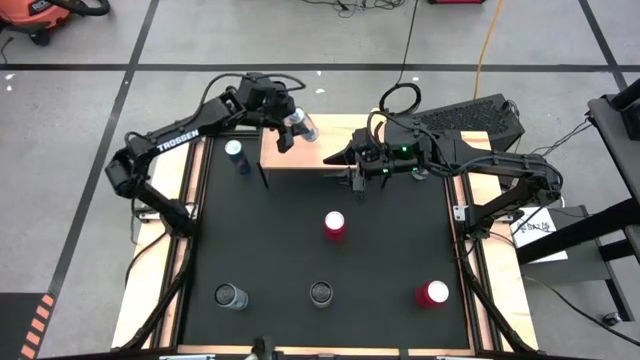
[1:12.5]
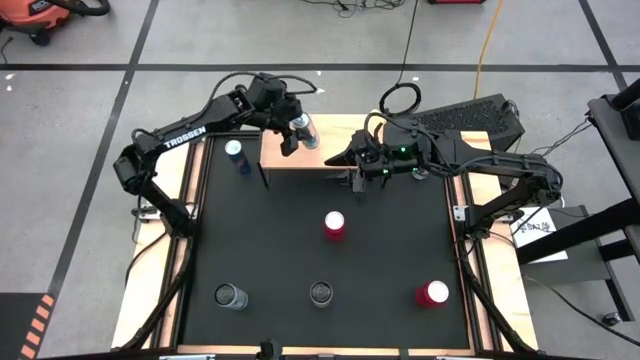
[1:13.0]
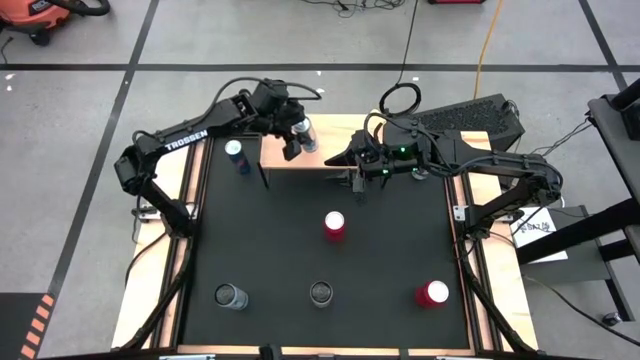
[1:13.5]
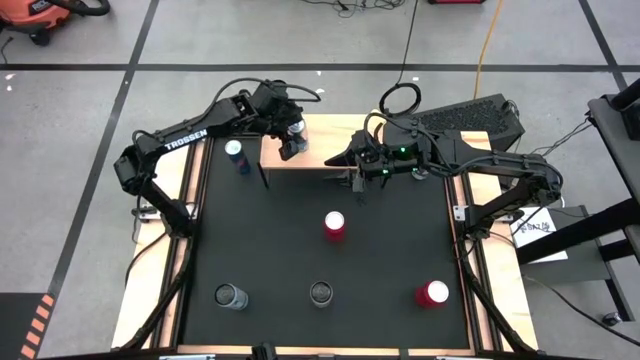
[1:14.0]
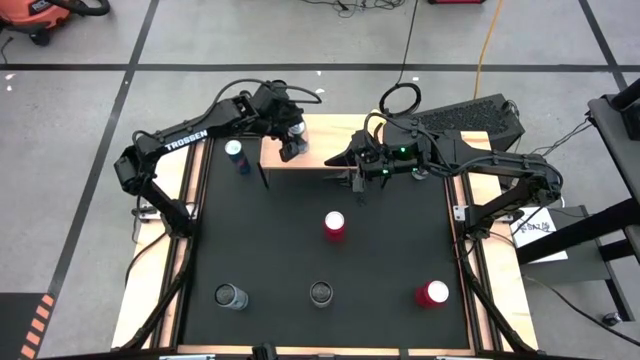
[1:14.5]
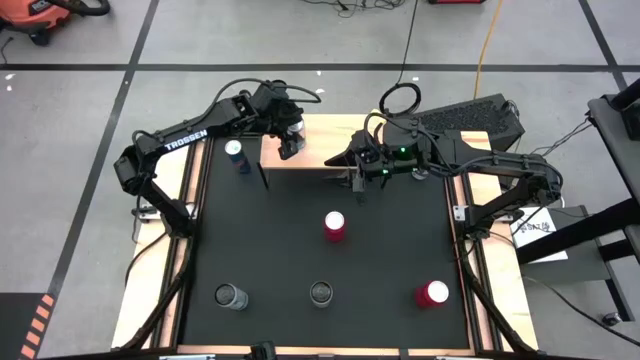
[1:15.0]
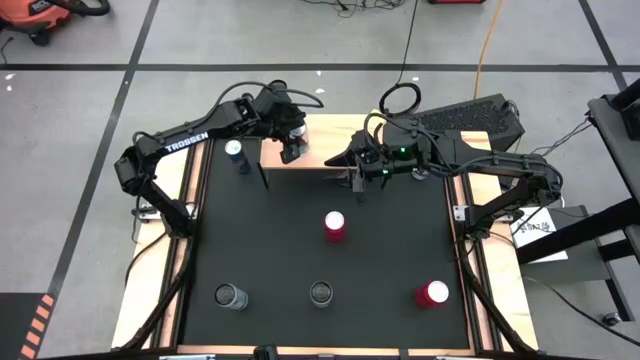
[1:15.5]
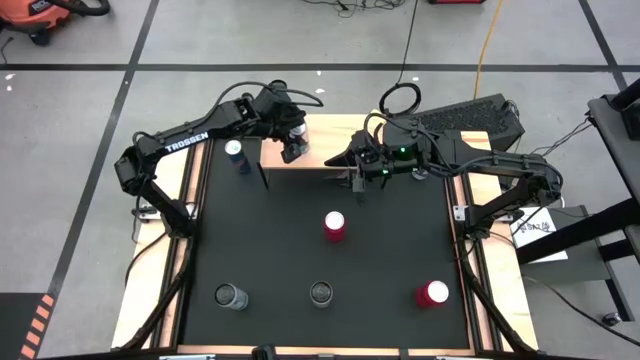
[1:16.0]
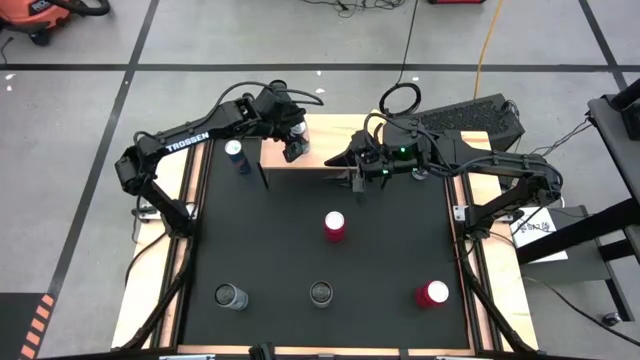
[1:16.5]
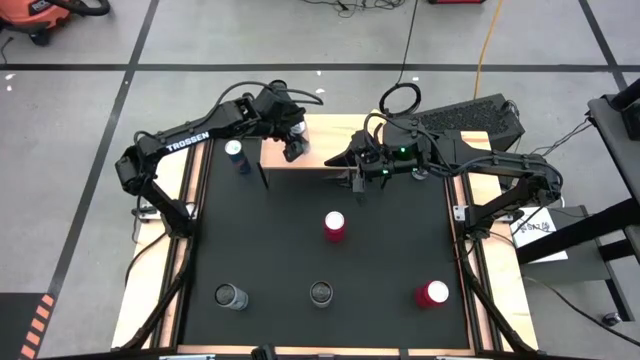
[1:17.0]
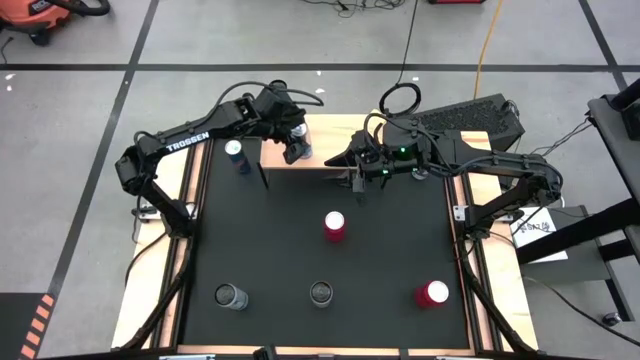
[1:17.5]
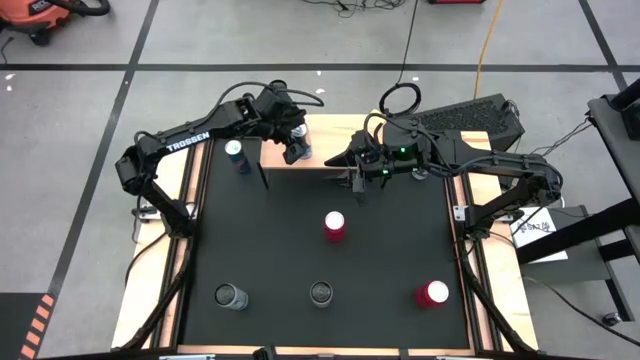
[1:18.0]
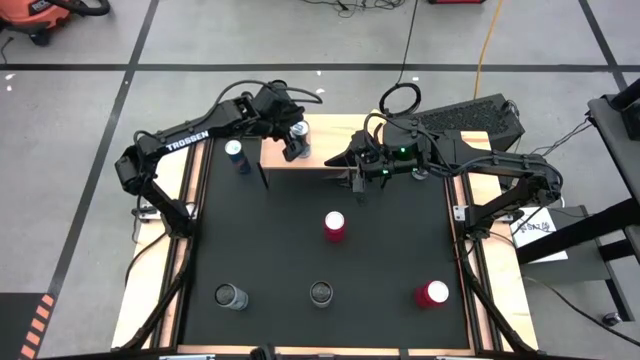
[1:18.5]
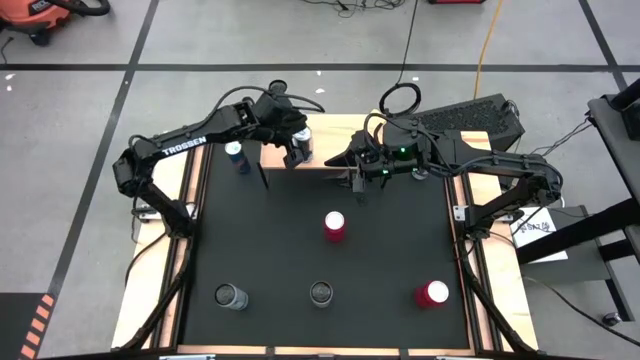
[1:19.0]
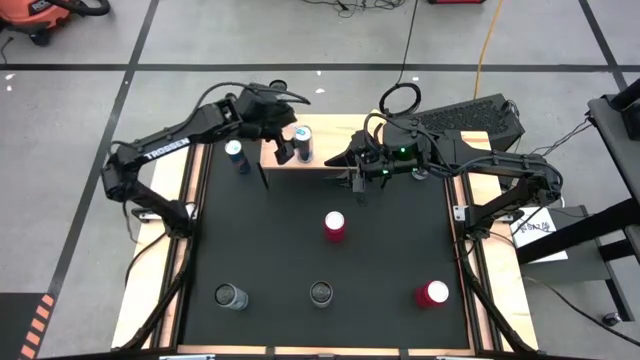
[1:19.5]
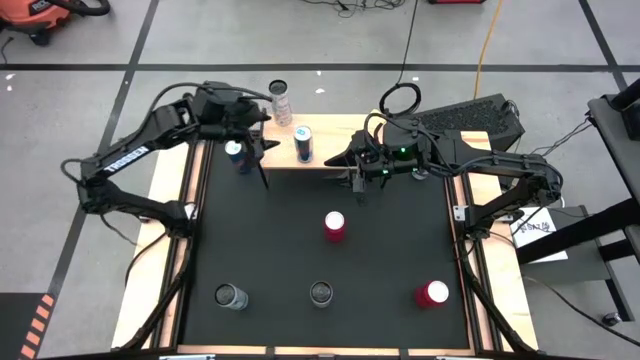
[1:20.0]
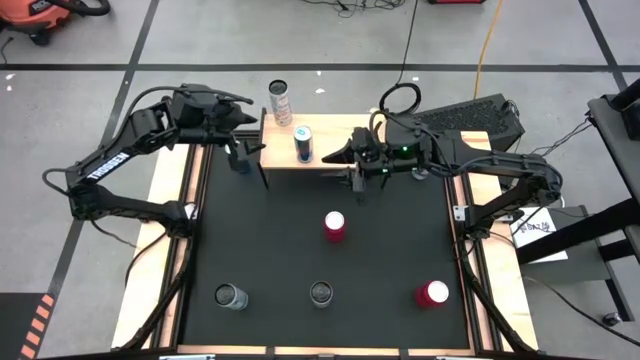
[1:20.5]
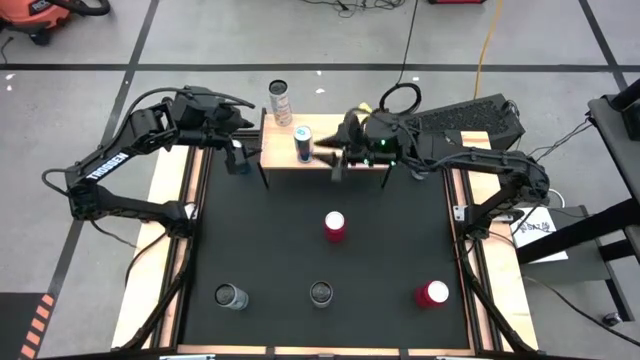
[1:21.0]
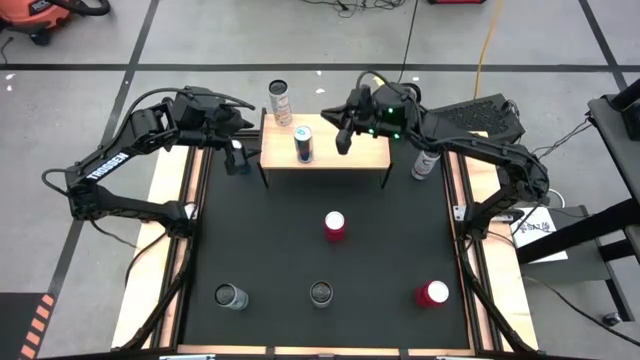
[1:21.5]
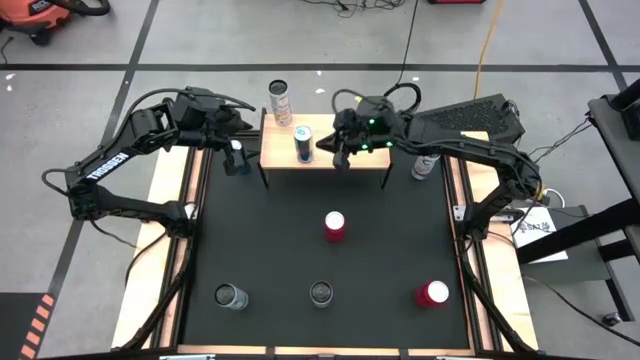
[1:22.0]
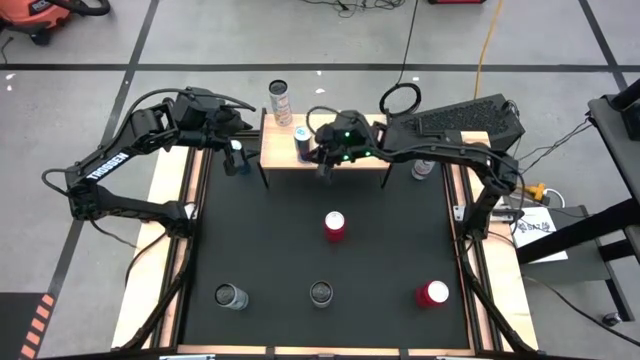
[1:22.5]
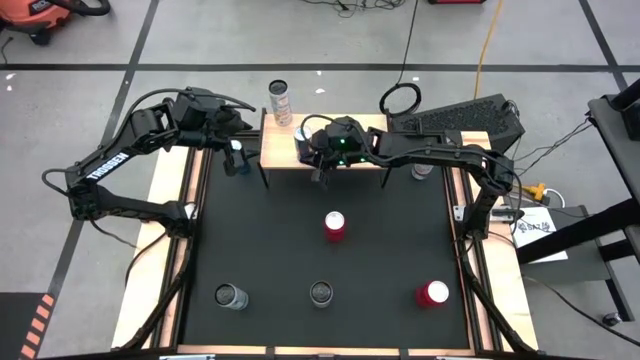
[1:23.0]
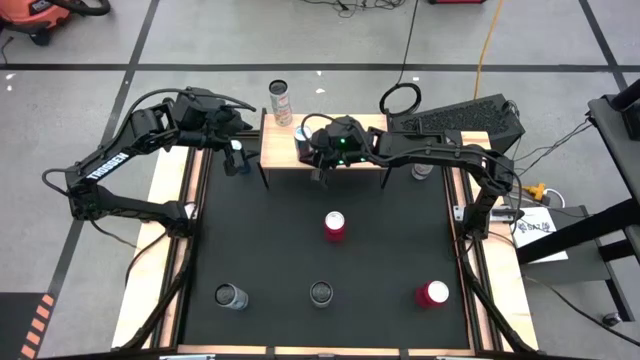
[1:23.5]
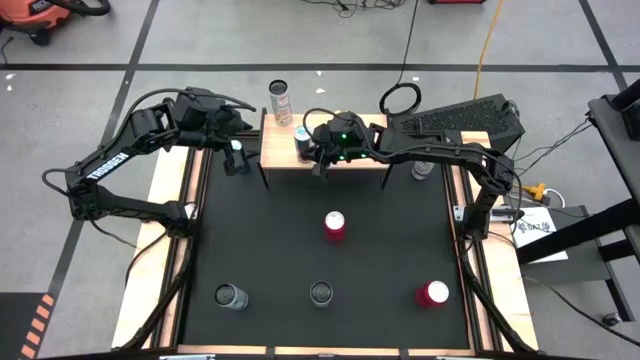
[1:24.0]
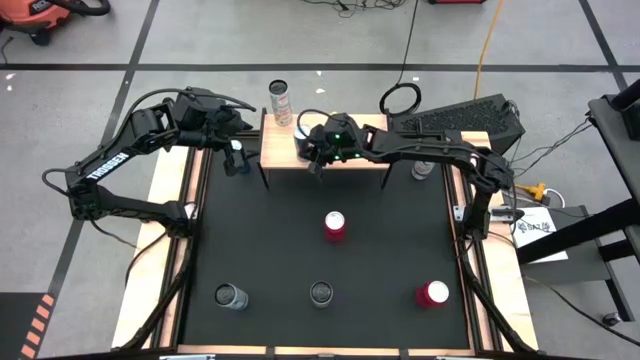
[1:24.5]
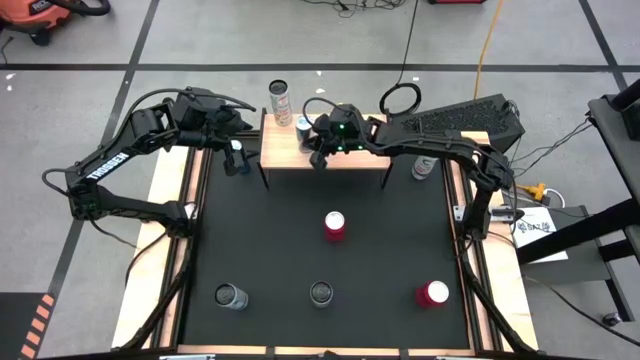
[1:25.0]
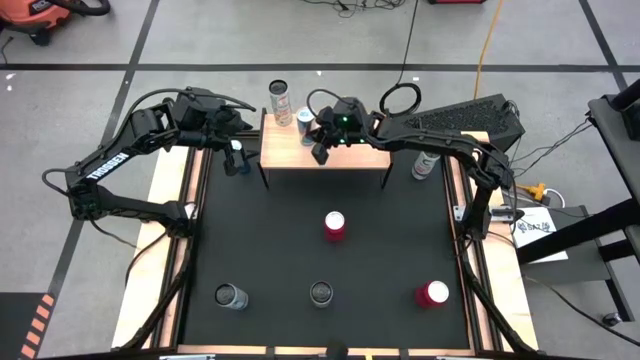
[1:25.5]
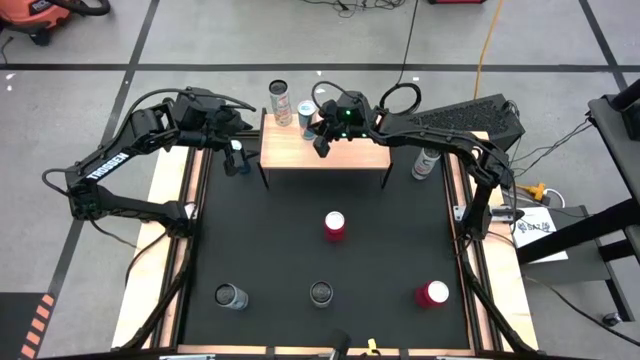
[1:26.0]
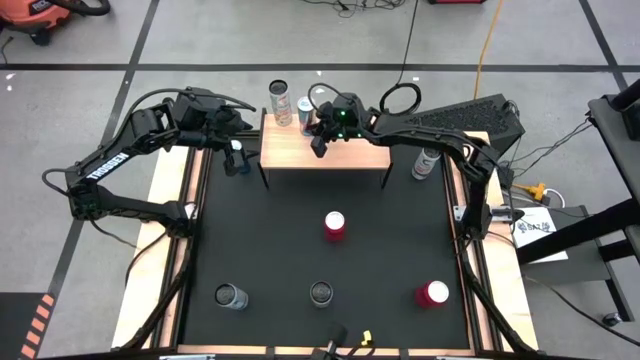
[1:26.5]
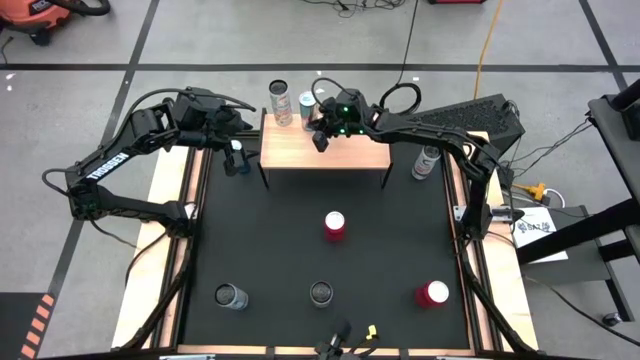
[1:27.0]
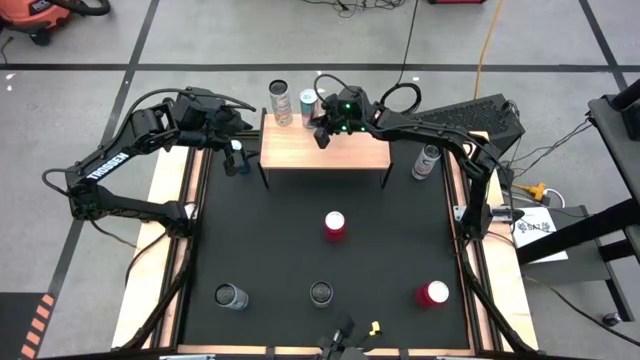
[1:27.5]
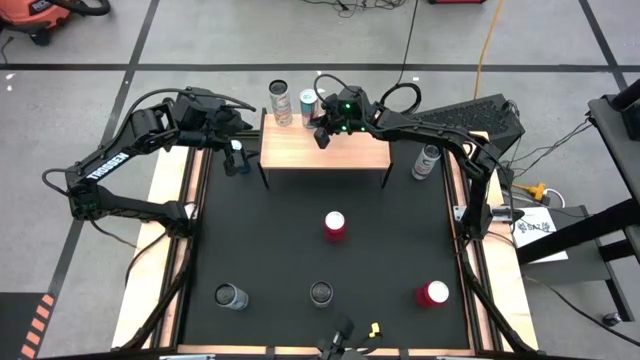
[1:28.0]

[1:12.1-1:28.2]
Task: Place canned beverage on shelf
Put the right blue soda can on the shelf

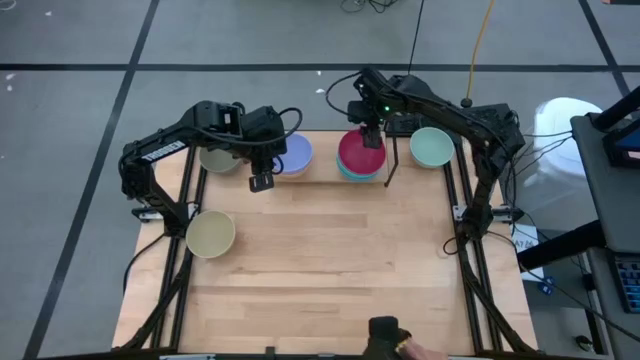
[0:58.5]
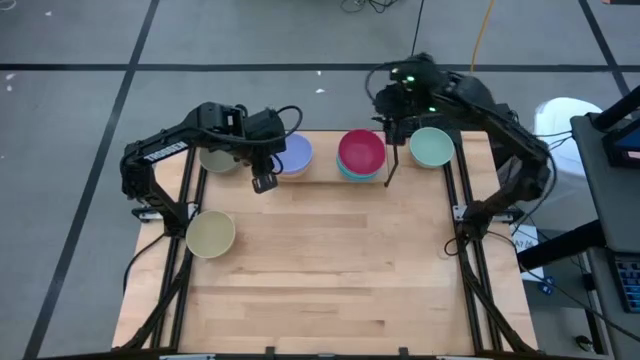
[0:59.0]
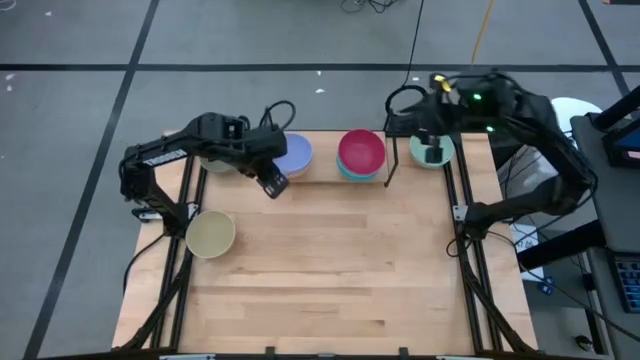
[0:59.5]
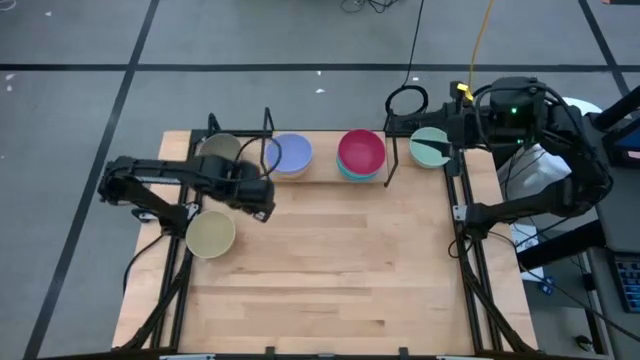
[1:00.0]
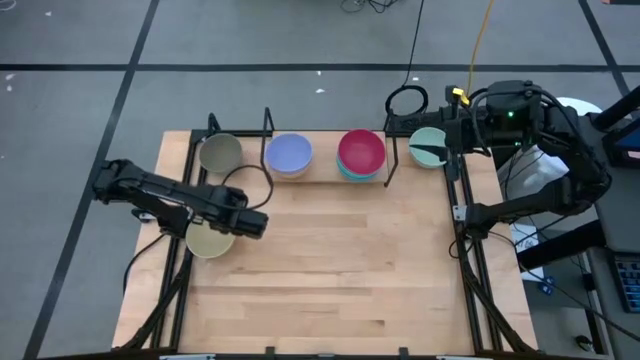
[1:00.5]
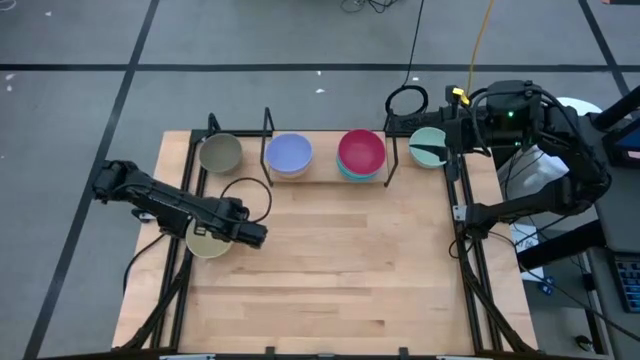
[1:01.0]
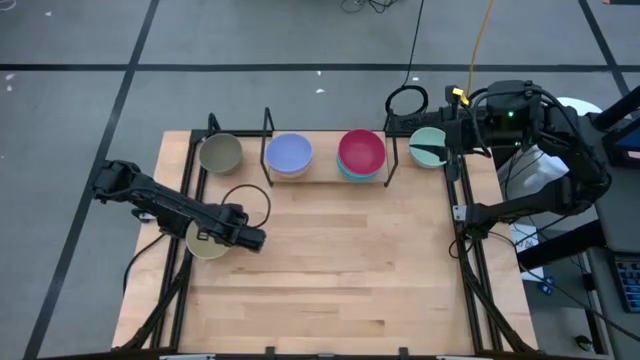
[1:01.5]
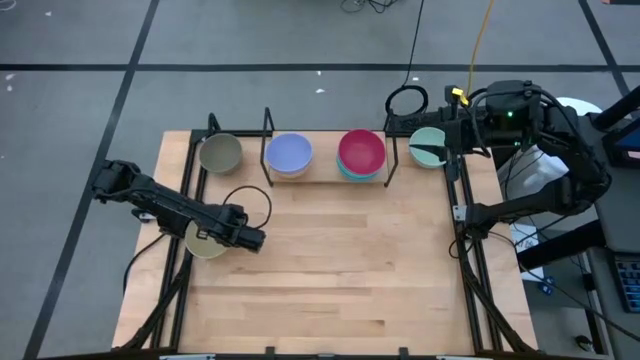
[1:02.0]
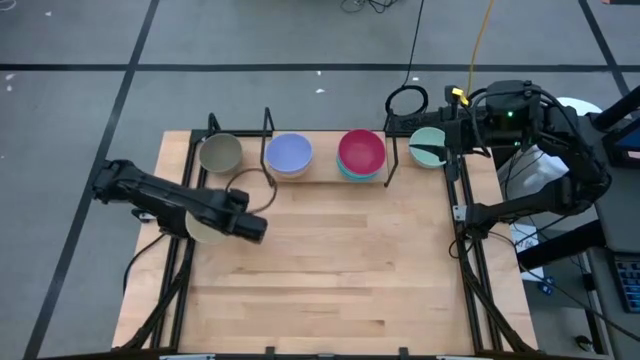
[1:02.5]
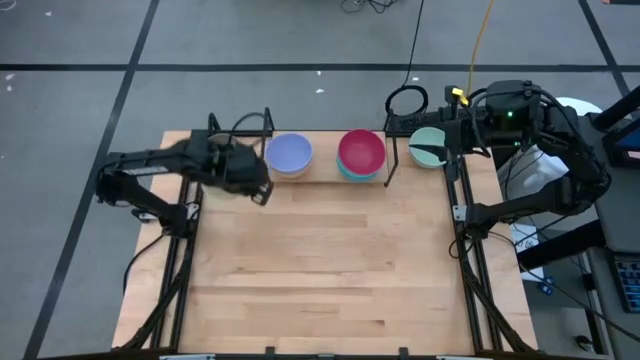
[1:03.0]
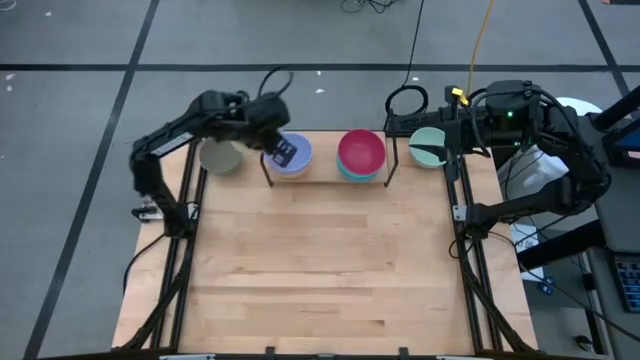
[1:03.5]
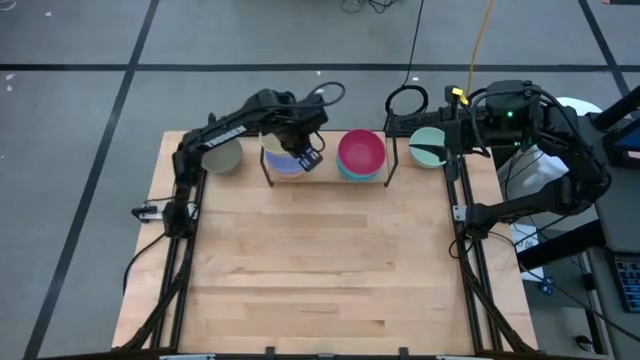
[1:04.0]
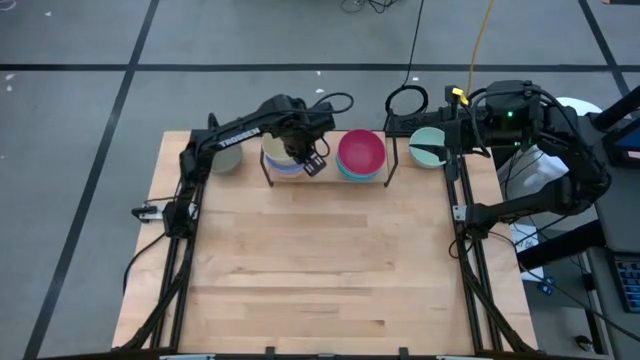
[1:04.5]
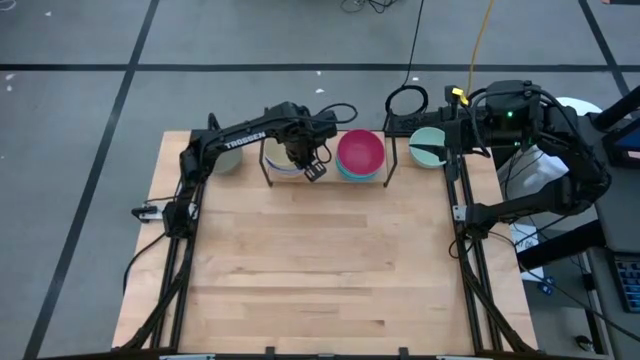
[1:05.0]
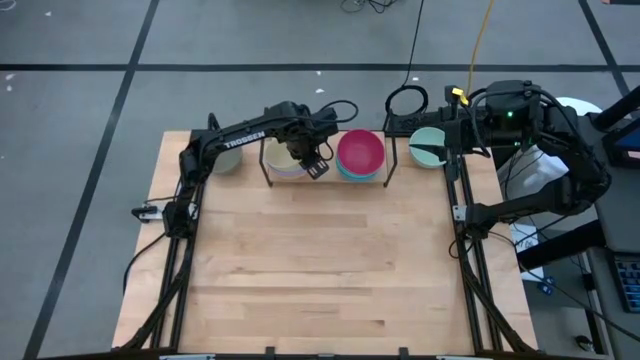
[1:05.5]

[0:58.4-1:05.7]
Task: Place and stack bowls onto a shelf
Stack the yellow bowl on top of the purple bowl on the shelf
